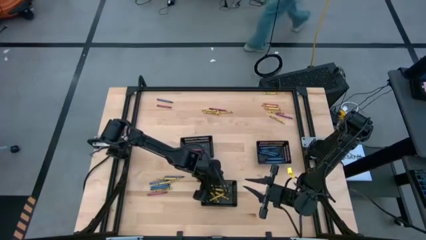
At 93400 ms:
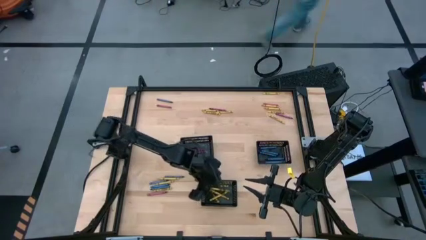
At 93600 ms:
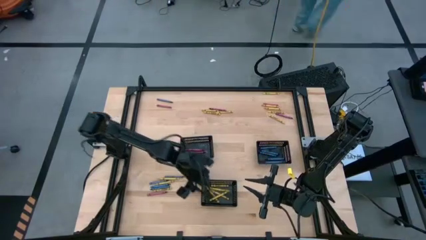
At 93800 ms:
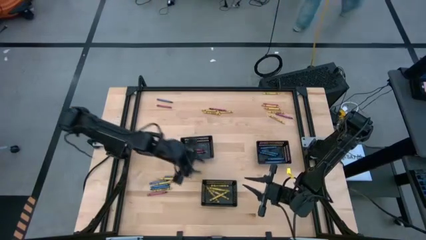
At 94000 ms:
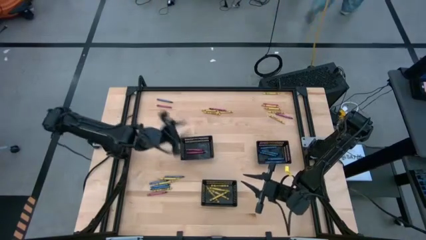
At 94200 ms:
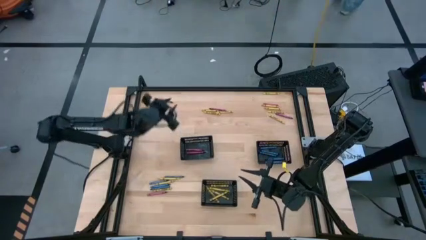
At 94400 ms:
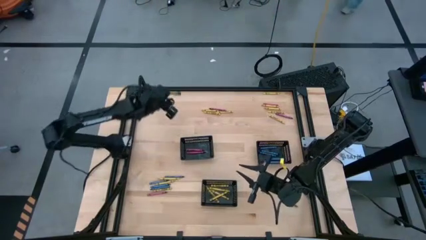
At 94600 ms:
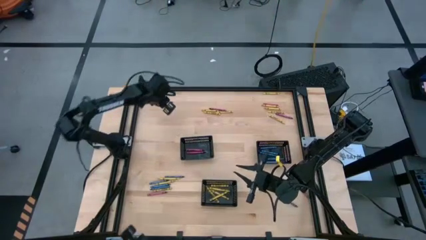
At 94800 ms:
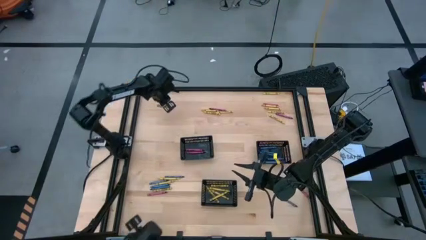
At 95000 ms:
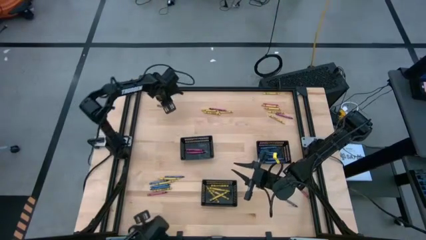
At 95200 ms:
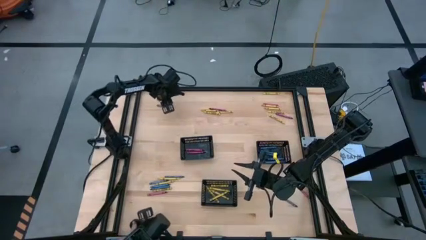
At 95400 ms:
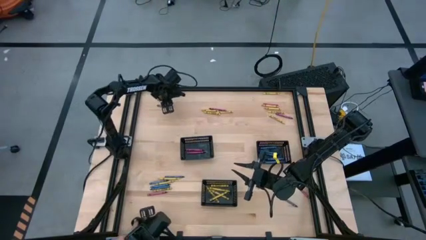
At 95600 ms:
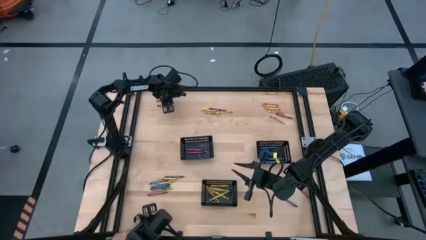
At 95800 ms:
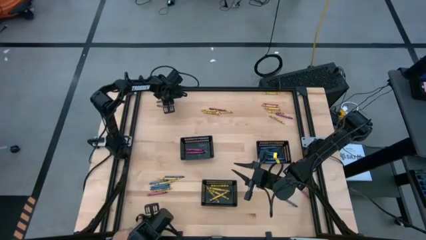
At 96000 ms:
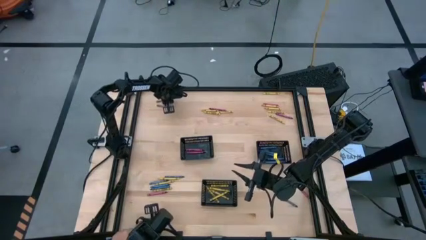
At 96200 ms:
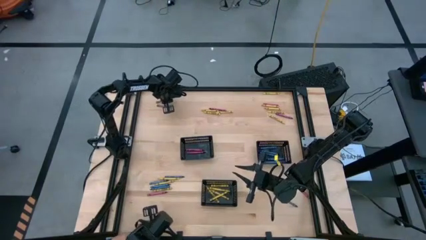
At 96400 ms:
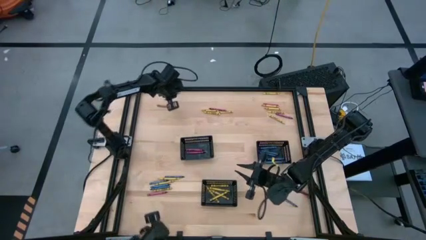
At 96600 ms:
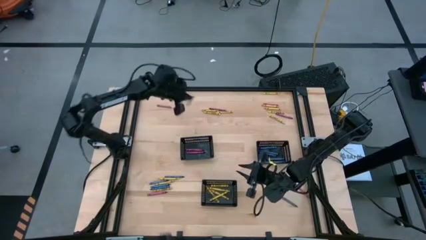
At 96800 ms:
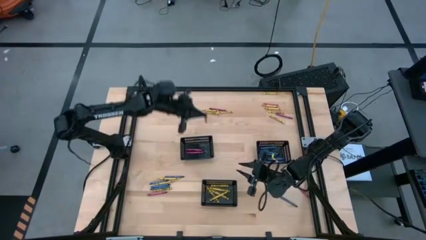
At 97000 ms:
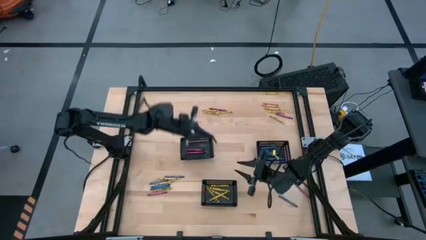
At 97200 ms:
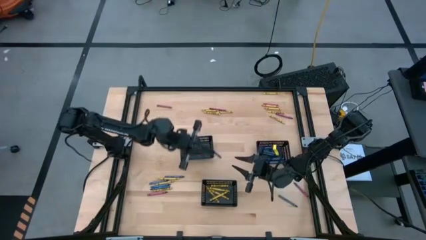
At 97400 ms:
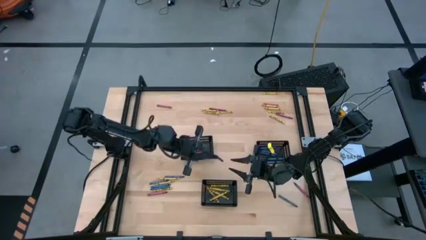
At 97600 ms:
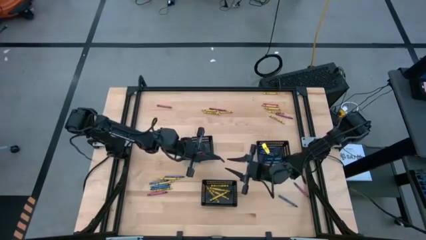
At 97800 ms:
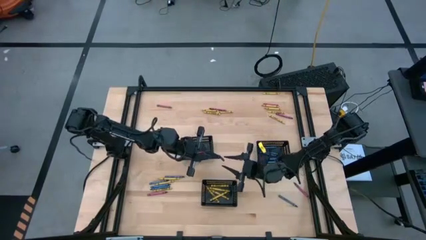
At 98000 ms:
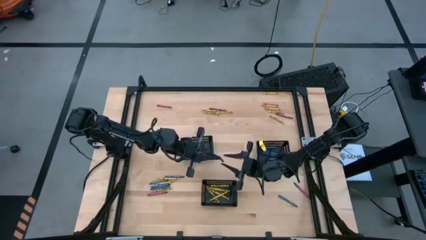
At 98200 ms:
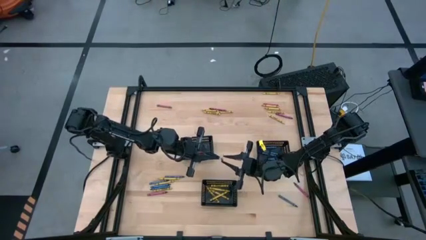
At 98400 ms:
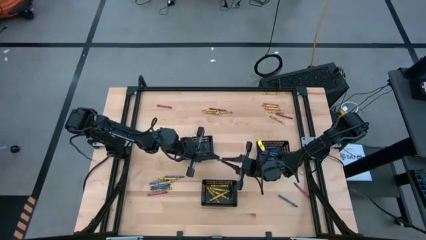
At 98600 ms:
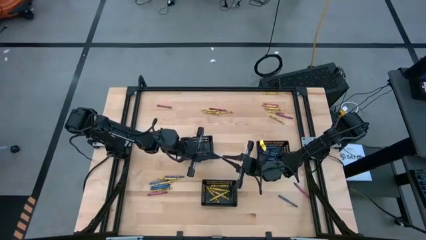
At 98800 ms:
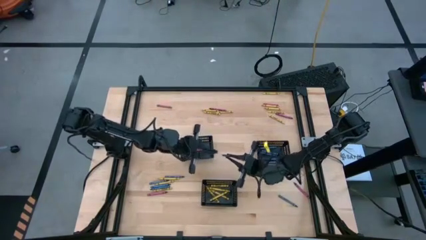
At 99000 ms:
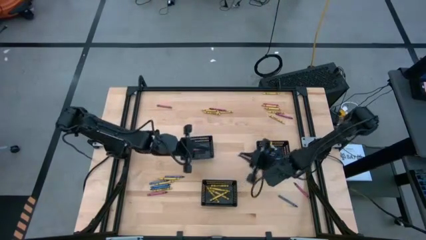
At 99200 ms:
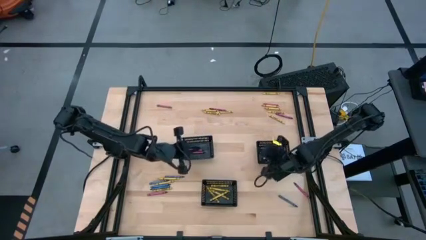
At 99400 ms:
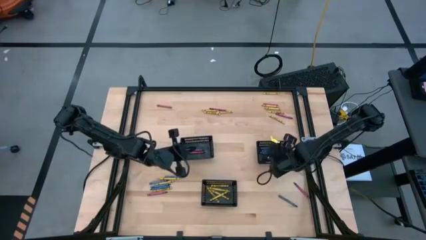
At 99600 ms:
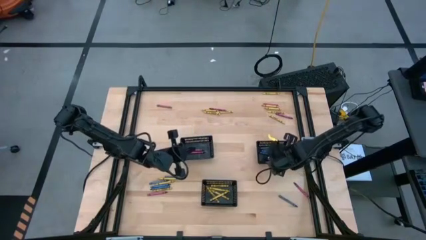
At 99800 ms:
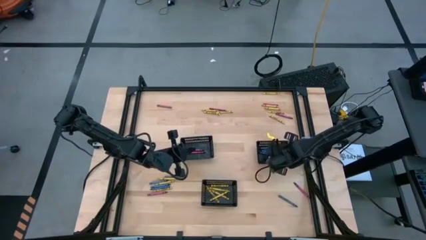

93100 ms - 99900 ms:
Task: Sort crayons
Put the blue crayon into the right black bin

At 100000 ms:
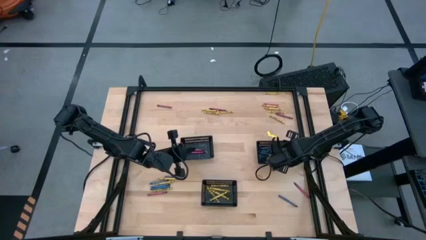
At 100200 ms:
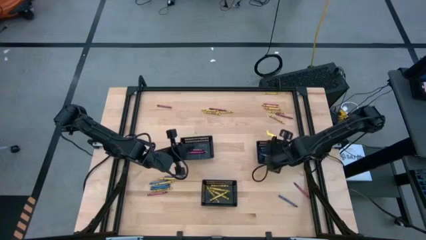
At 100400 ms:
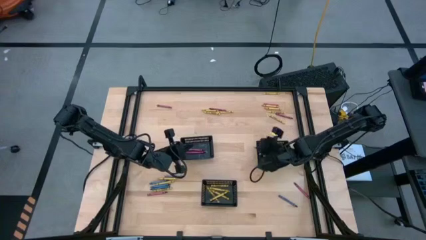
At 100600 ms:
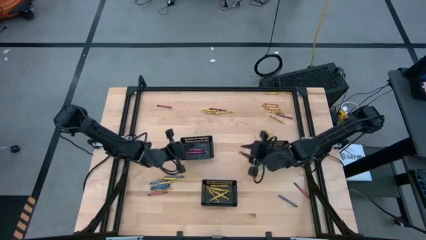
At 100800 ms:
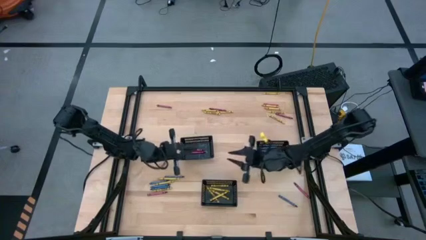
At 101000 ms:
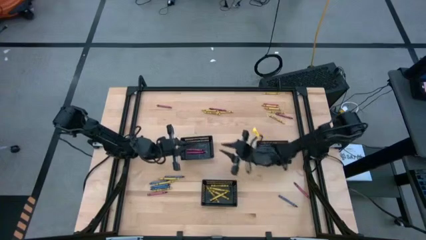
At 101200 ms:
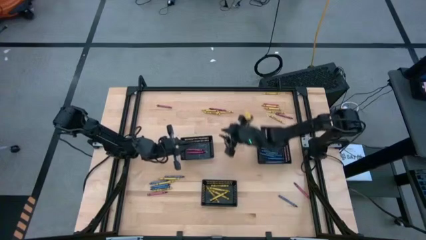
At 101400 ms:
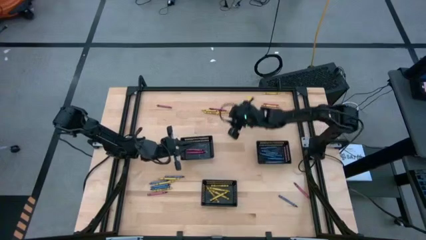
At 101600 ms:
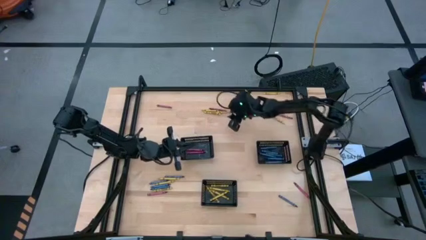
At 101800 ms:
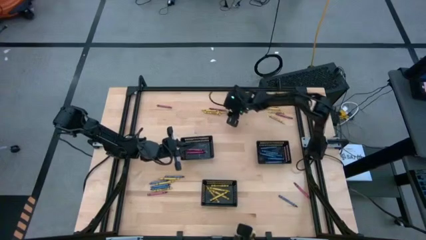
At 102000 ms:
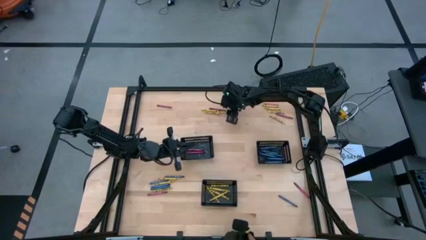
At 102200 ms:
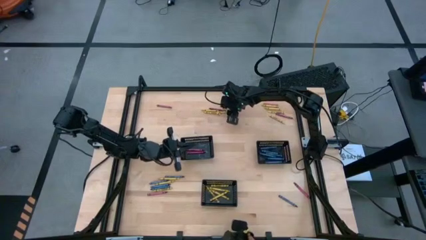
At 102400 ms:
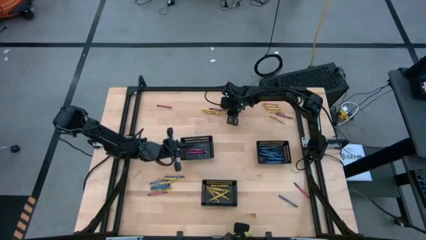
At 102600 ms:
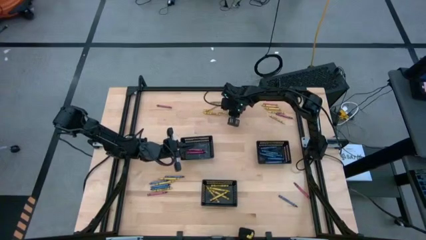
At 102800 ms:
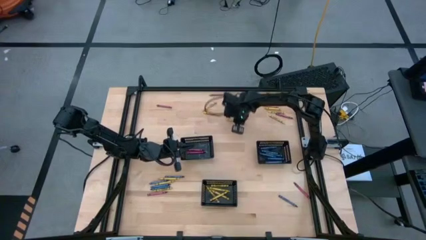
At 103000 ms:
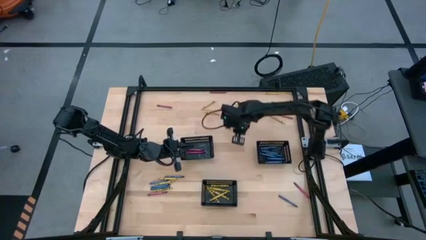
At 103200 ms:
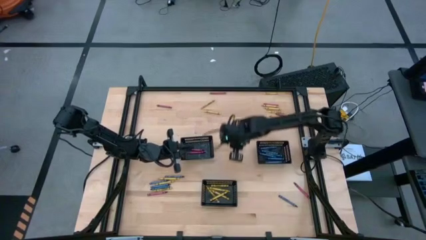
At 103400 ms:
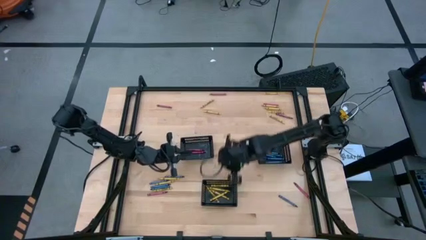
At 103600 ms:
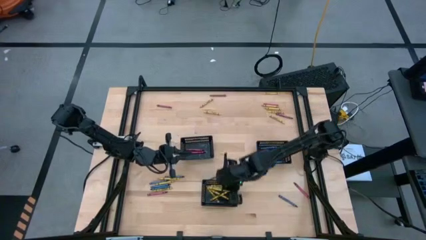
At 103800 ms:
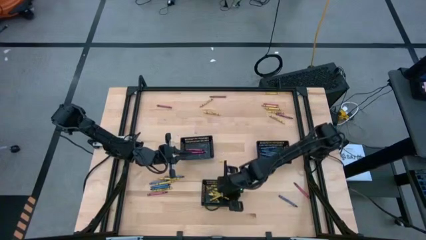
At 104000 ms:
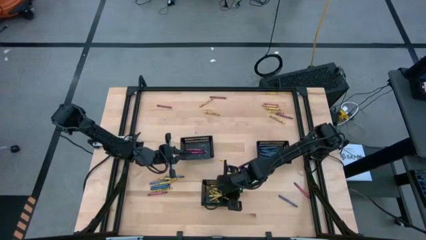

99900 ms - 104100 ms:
Put the yellow crayon into the bottom black bin

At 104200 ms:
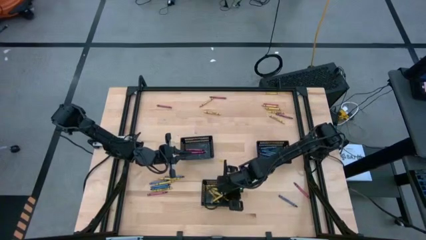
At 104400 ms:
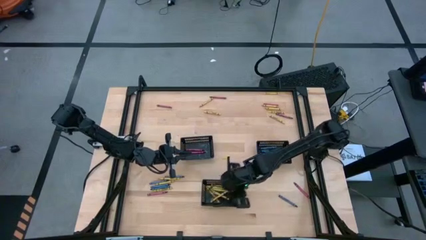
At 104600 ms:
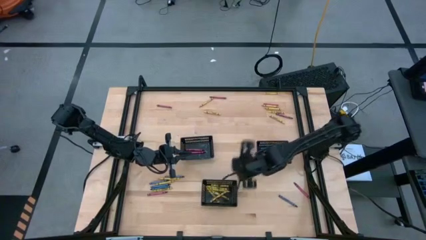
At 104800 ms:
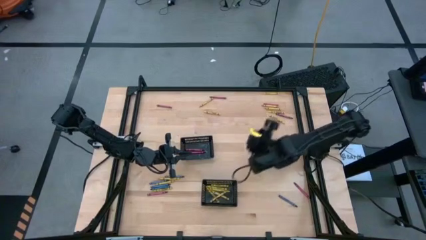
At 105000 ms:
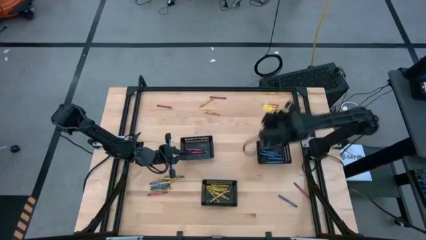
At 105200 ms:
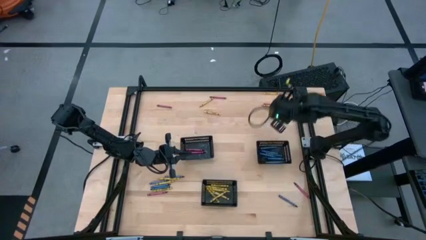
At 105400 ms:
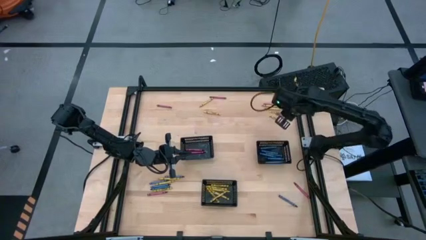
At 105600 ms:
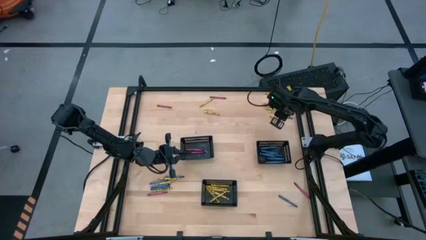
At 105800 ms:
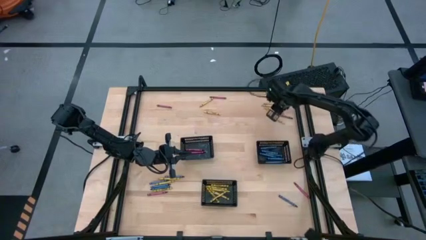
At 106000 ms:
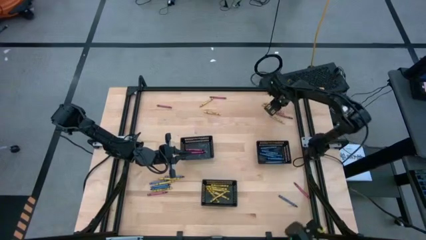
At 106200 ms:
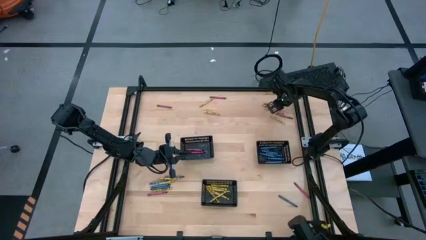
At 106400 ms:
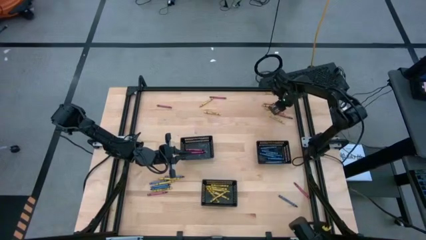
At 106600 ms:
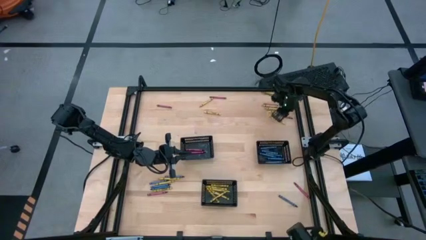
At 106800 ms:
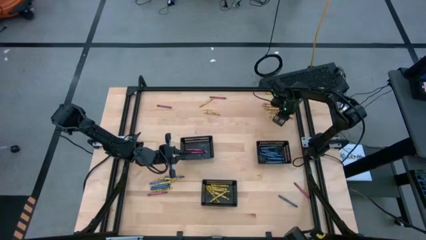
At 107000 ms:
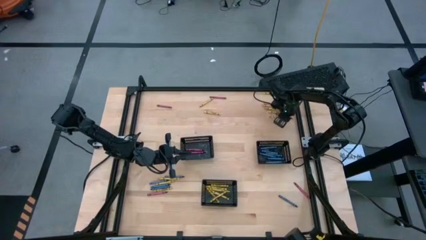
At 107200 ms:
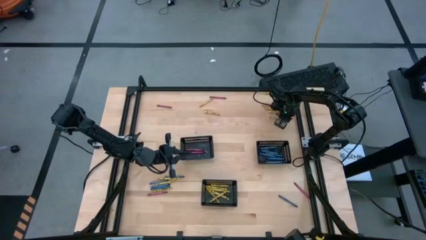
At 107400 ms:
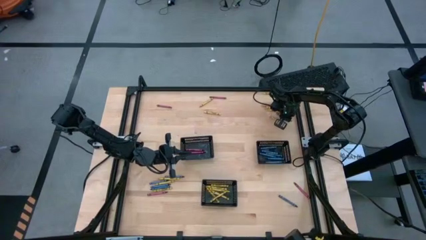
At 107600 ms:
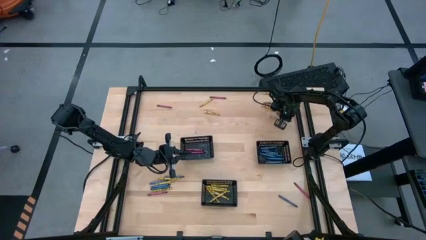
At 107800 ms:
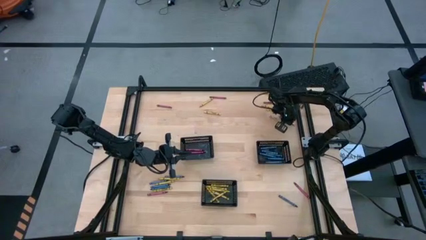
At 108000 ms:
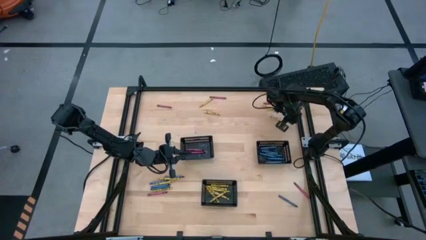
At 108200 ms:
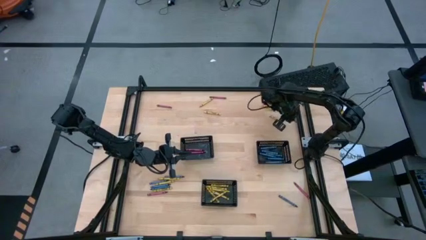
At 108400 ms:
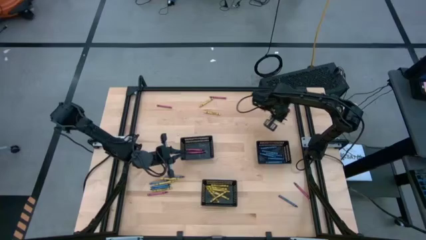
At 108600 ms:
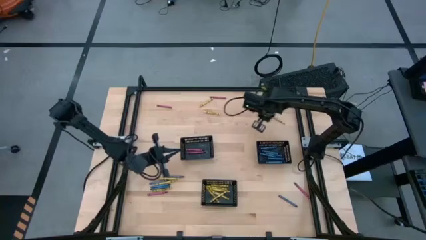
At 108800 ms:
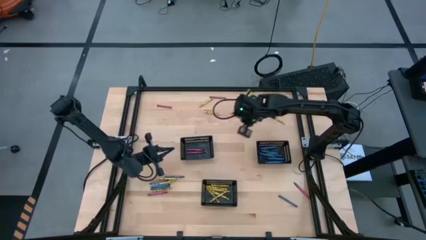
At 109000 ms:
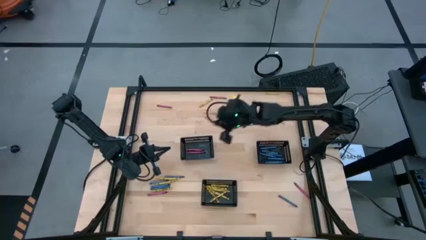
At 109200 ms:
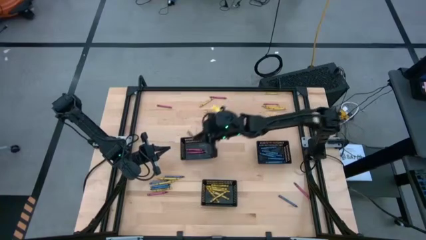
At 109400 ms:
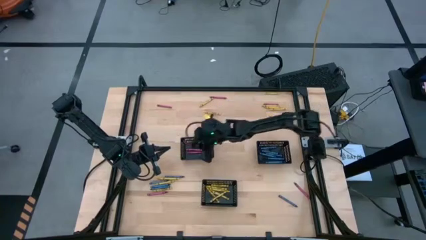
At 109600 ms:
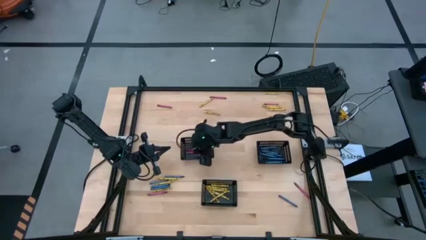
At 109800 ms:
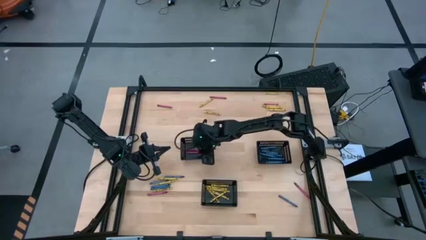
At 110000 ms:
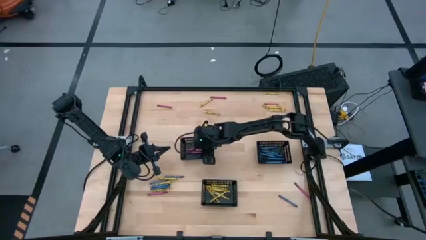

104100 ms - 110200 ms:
Put the red crayon into the left black bin
